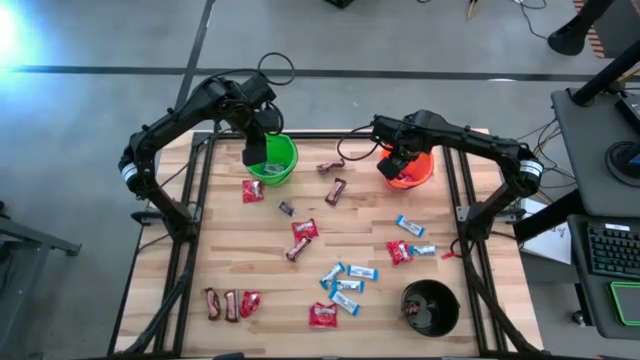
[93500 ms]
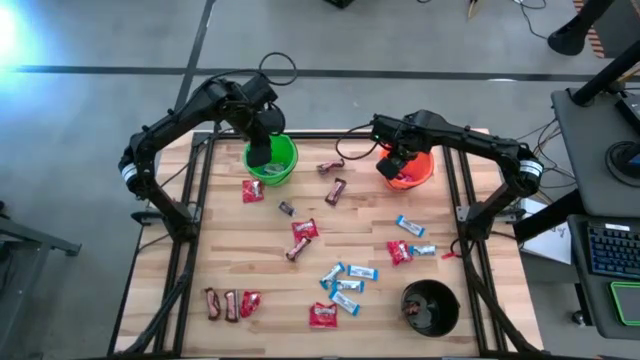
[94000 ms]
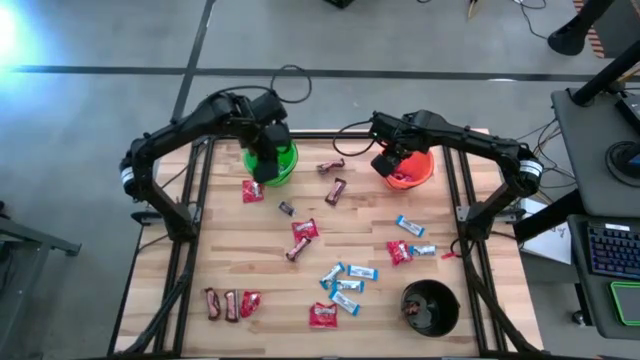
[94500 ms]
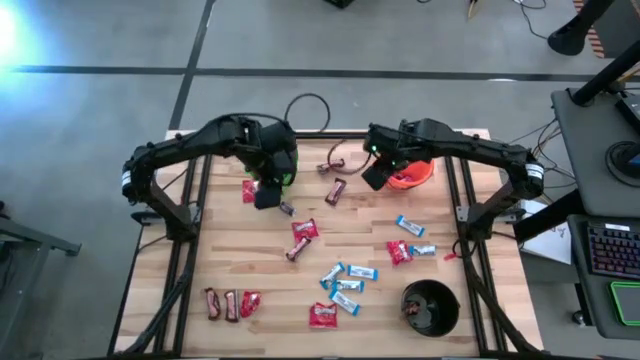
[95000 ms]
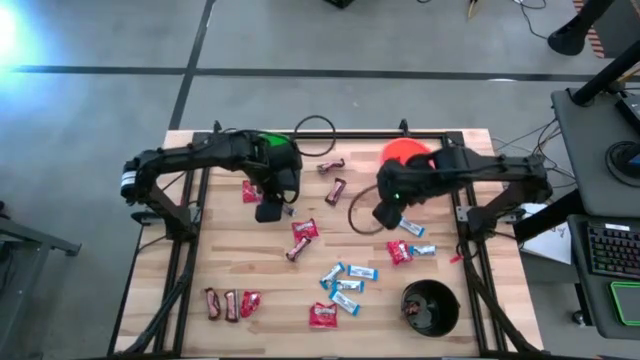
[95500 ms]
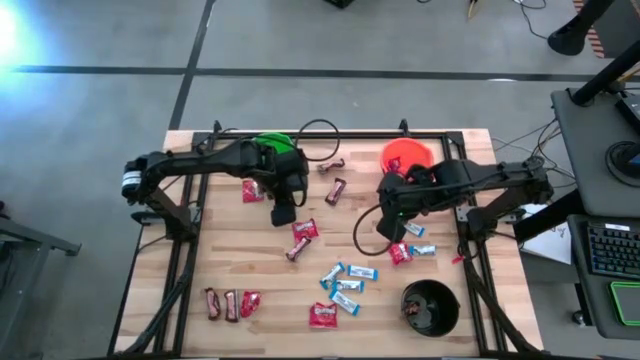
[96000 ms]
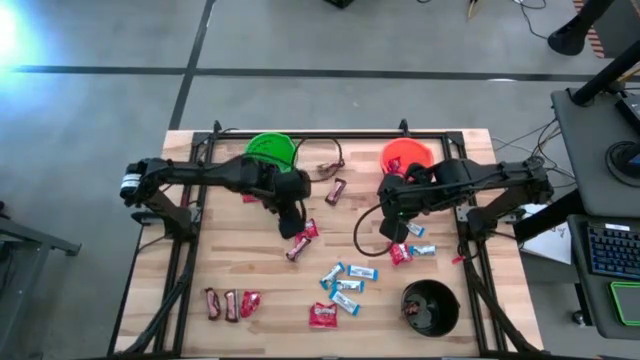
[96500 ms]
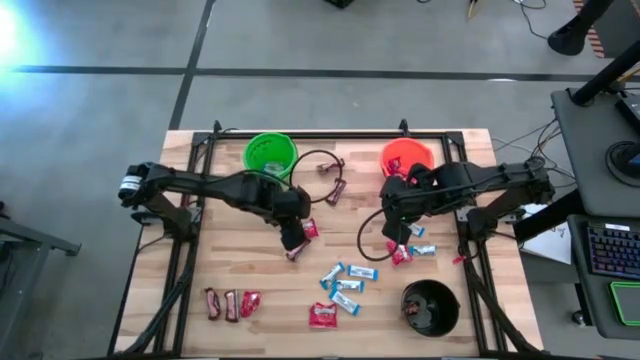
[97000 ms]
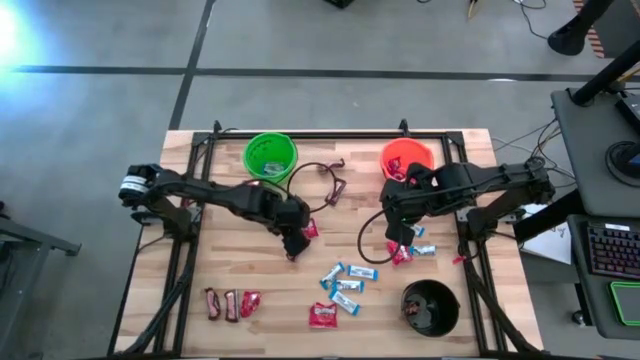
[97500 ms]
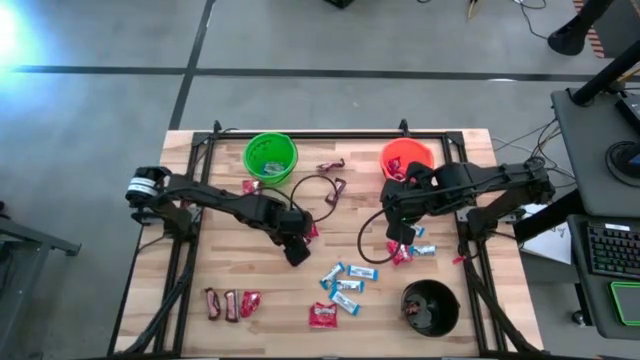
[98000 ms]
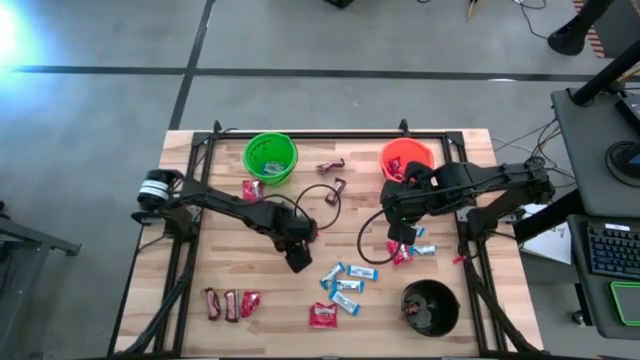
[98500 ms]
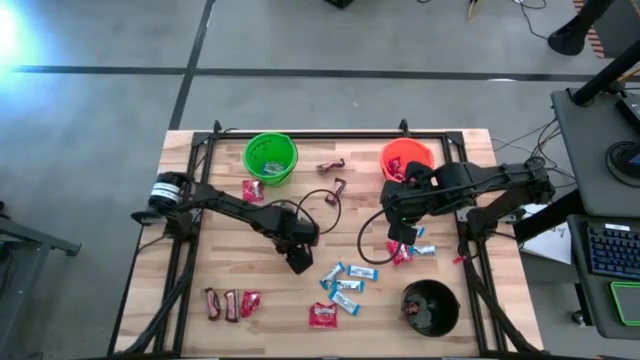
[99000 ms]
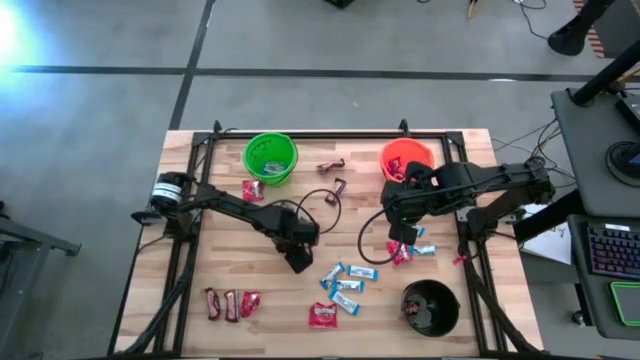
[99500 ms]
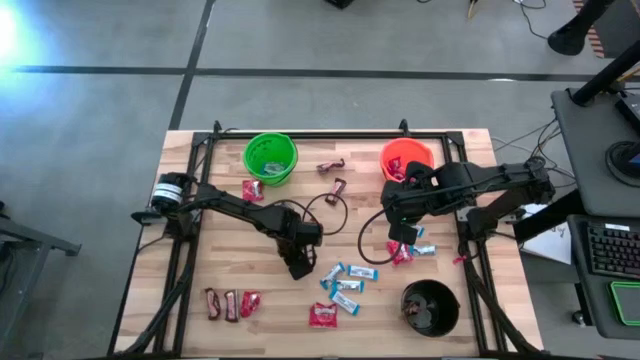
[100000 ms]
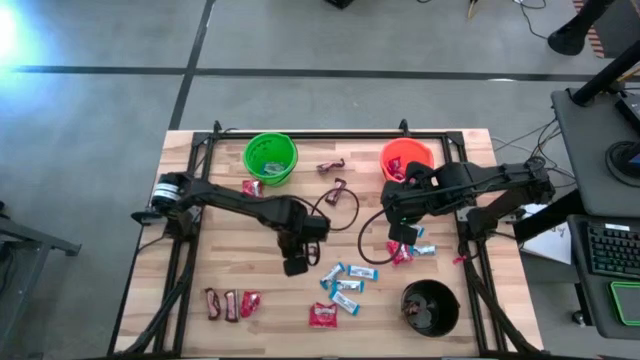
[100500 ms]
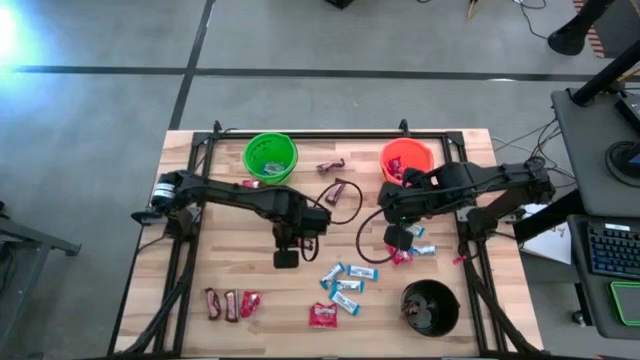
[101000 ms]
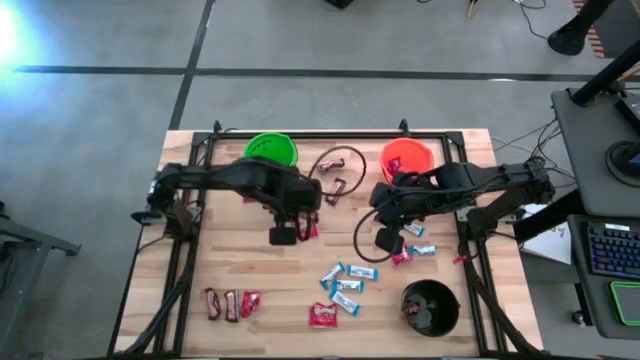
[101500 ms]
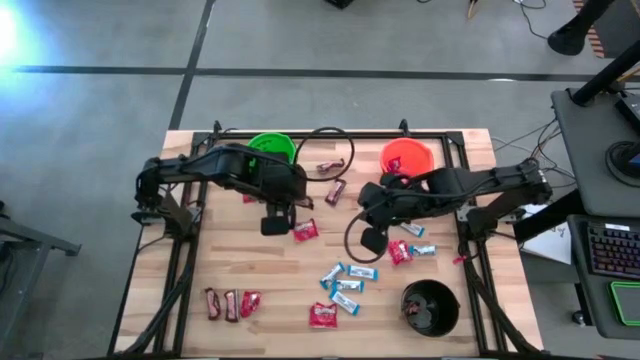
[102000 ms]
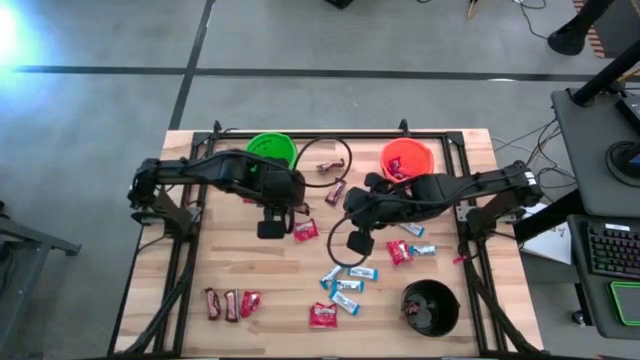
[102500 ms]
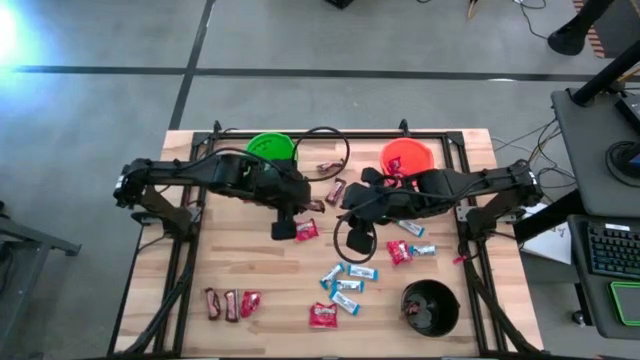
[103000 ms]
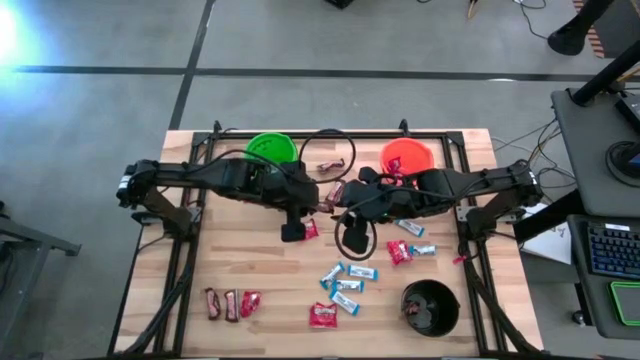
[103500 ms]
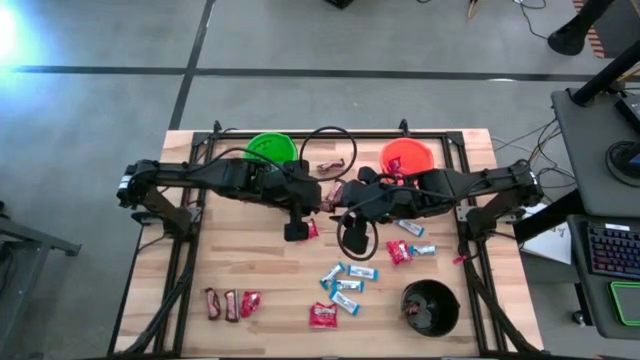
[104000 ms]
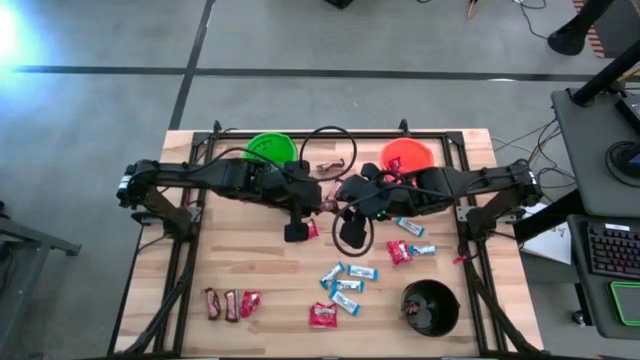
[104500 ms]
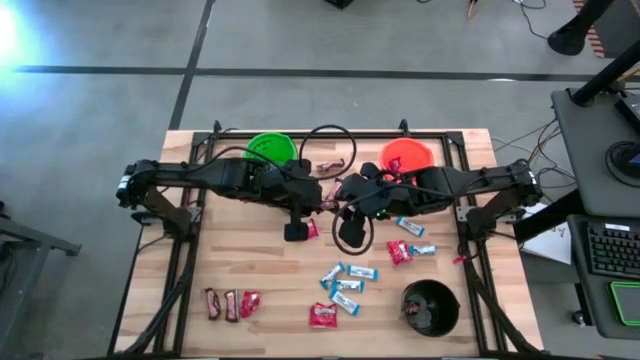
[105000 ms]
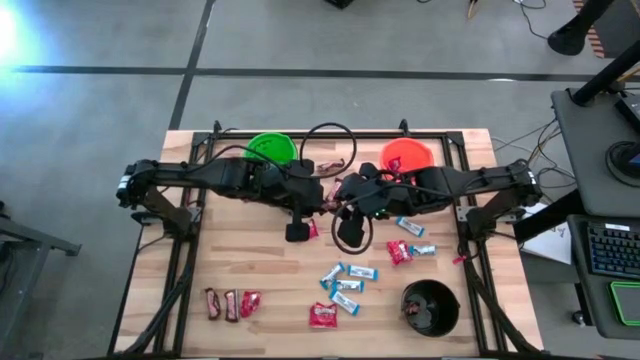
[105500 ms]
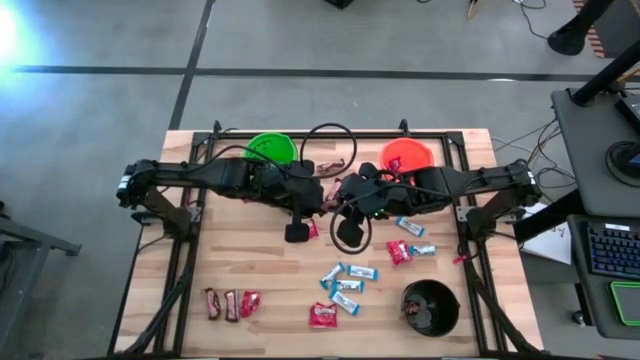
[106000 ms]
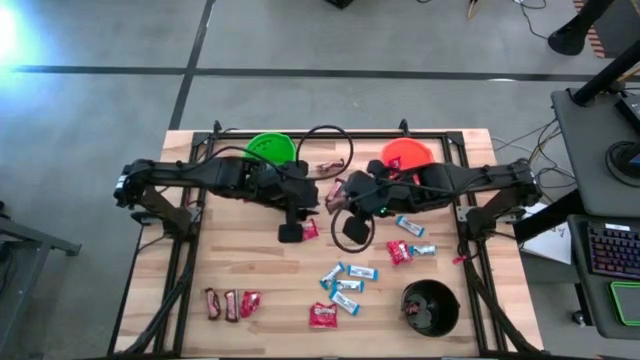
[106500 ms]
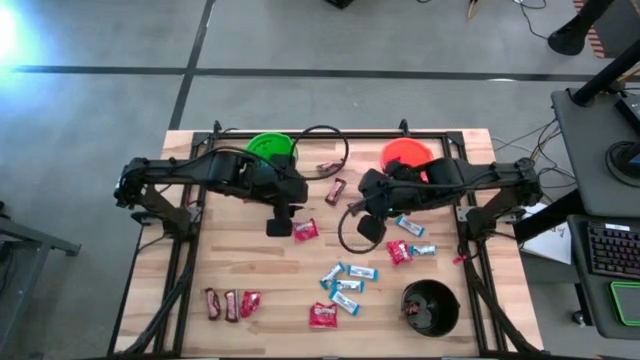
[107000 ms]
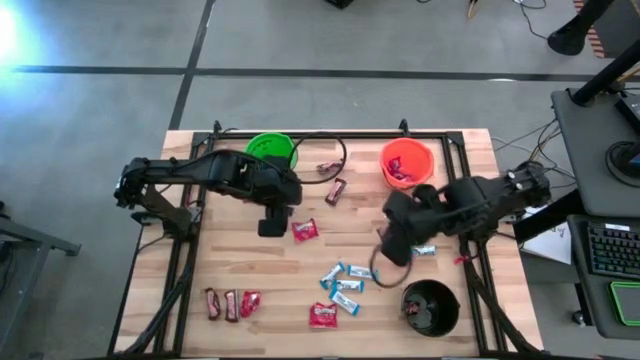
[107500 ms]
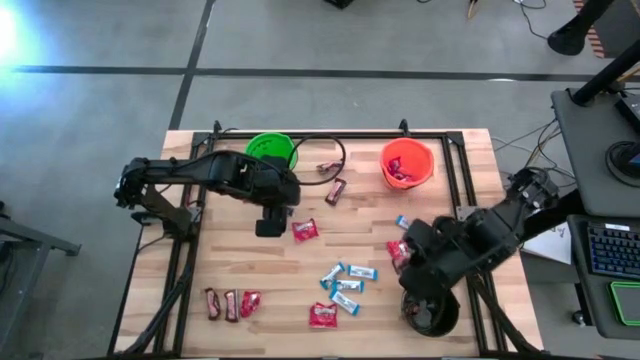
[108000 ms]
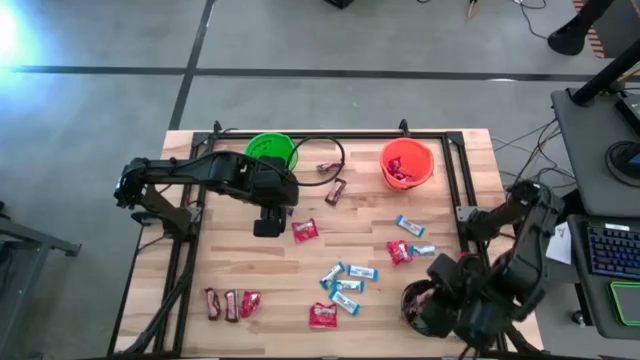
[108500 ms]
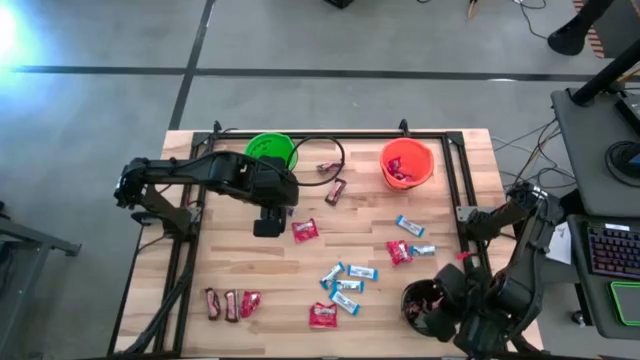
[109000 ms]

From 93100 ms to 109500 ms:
Task: Sort candy
Put the brown candy into the black bucket

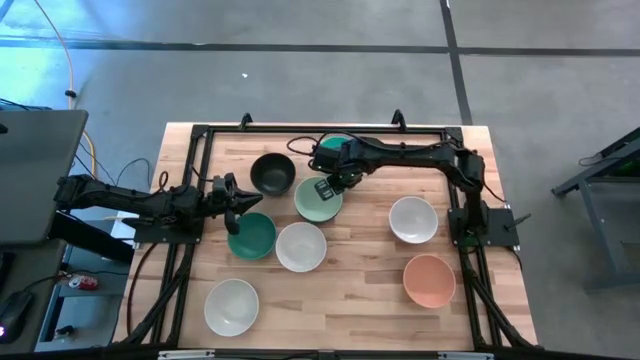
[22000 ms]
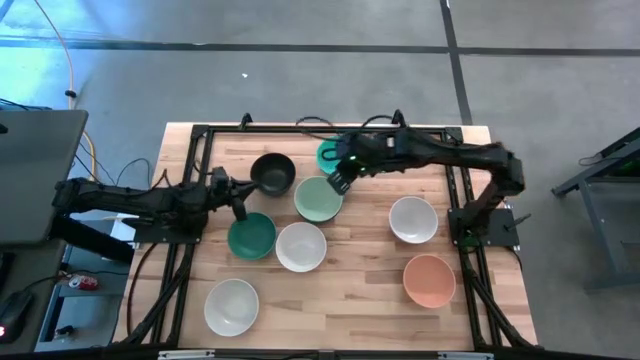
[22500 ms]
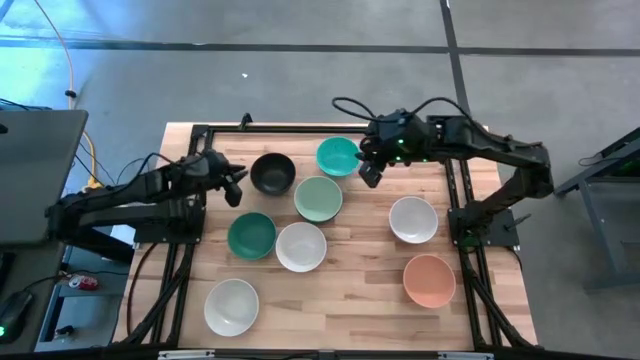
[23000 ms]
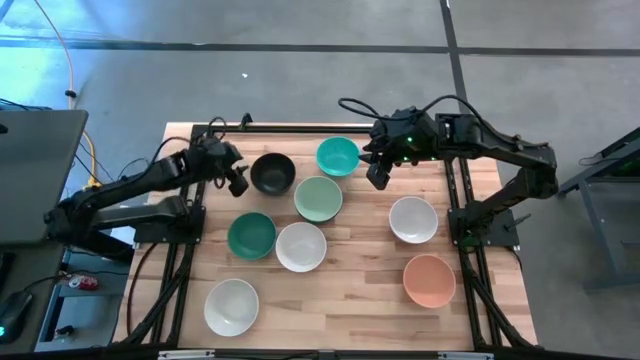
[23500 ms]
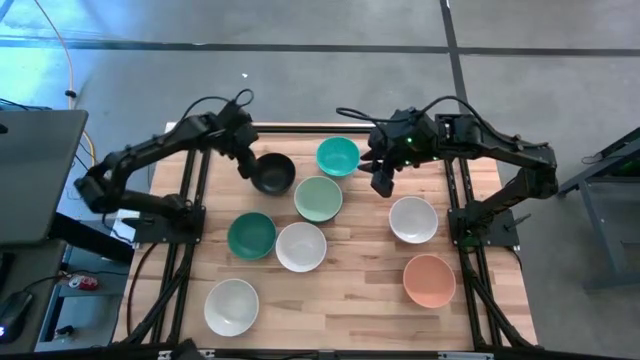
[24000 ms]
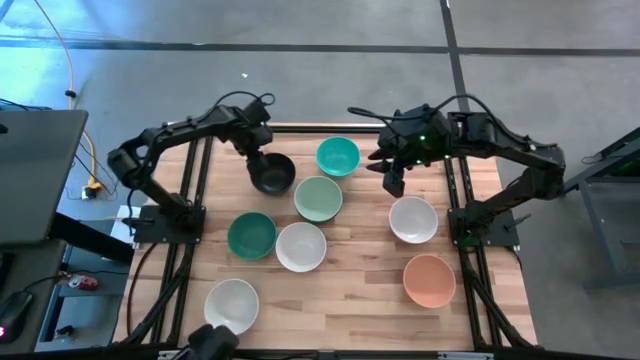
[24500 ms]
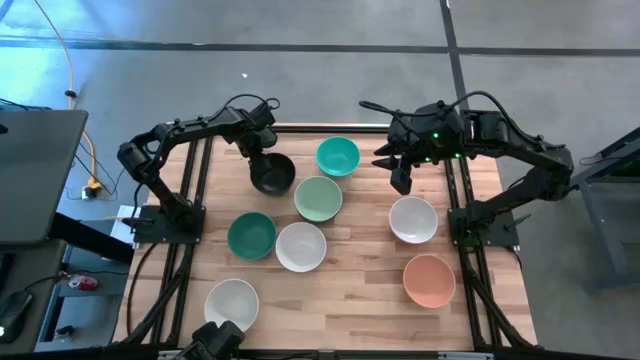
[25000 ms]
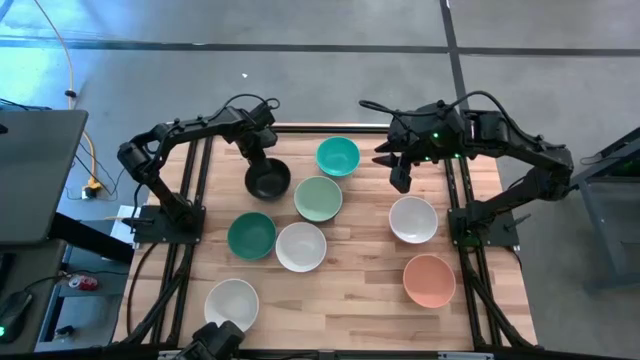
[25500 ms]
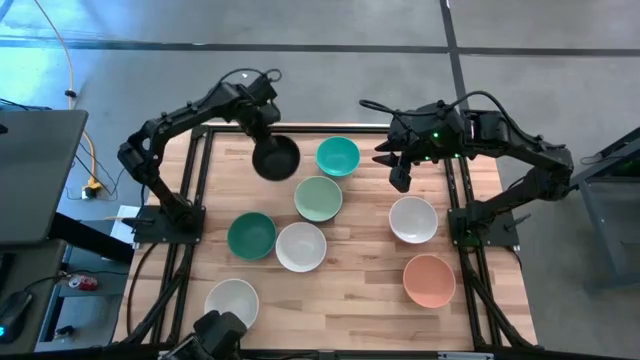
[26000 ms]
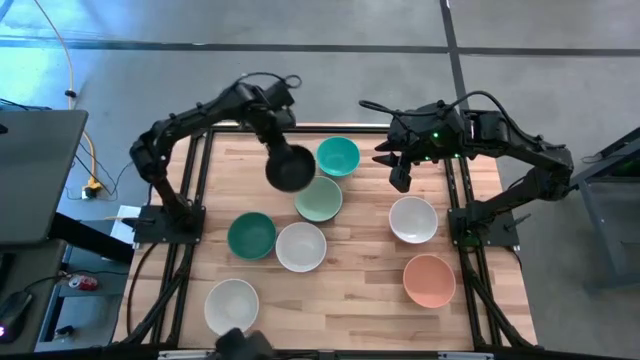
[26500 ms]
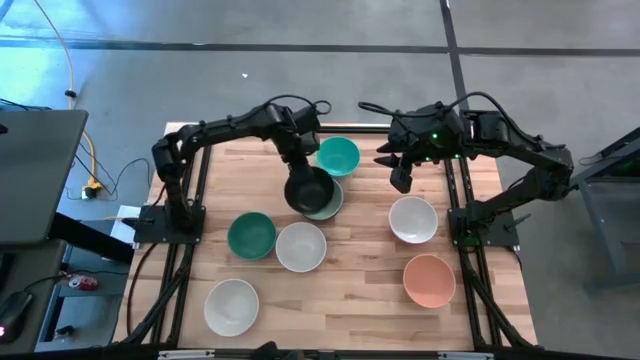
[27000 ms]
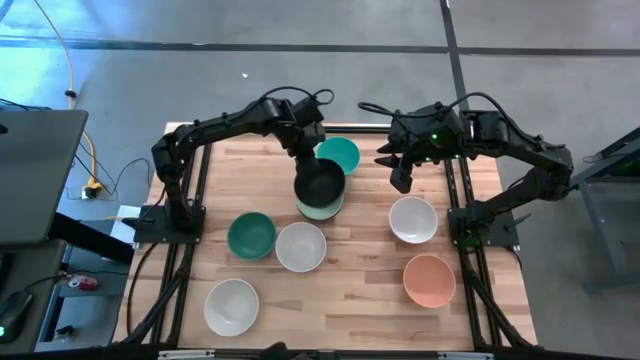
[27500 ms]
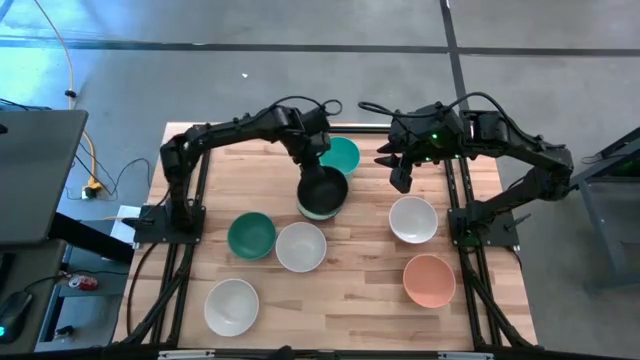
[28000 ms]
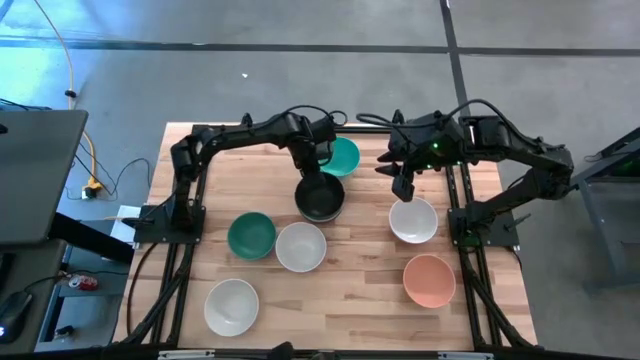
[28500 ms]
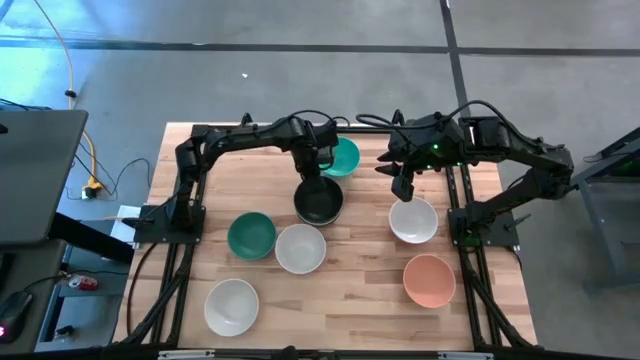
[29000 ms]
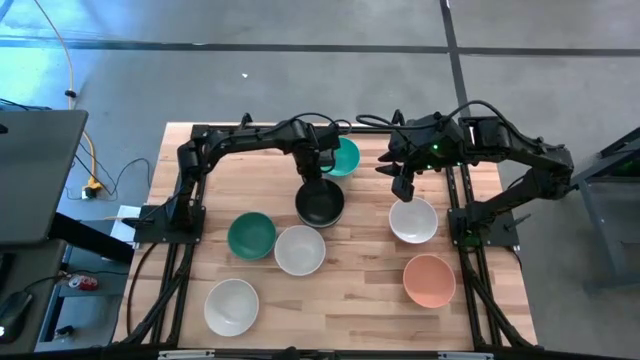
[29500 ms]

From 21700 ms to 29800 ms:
Task: Nest bowls inside each other
Stack the black bowl on top of the light green bowl
